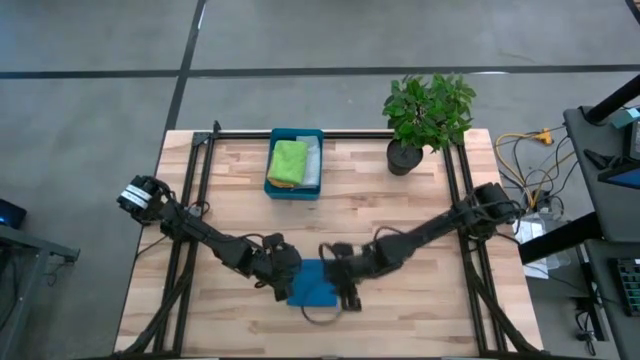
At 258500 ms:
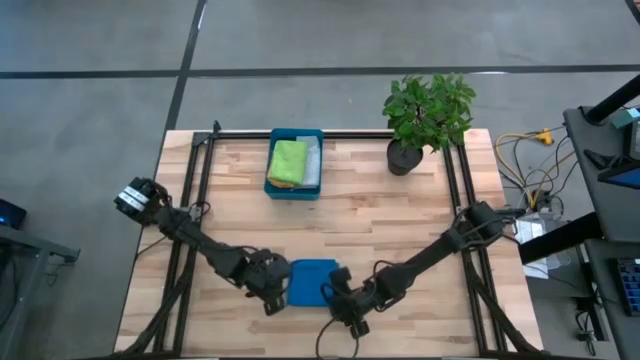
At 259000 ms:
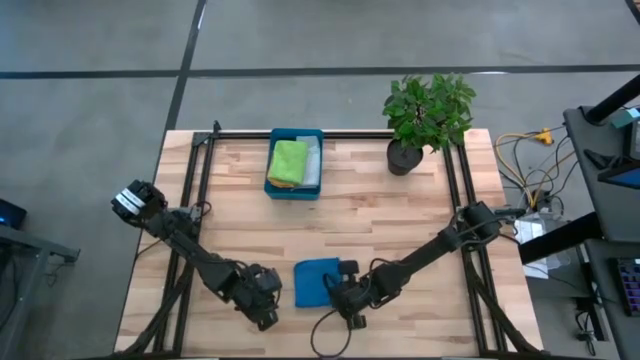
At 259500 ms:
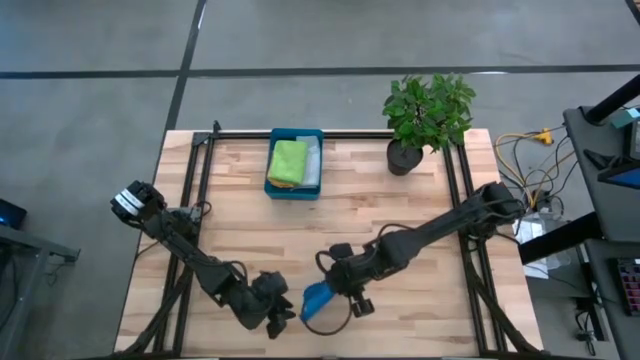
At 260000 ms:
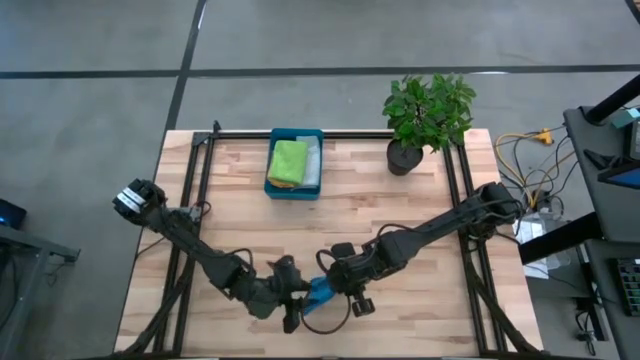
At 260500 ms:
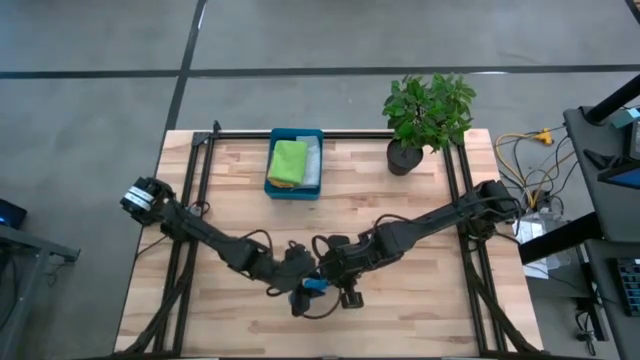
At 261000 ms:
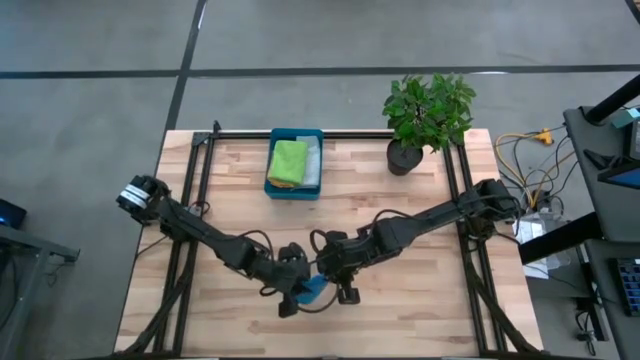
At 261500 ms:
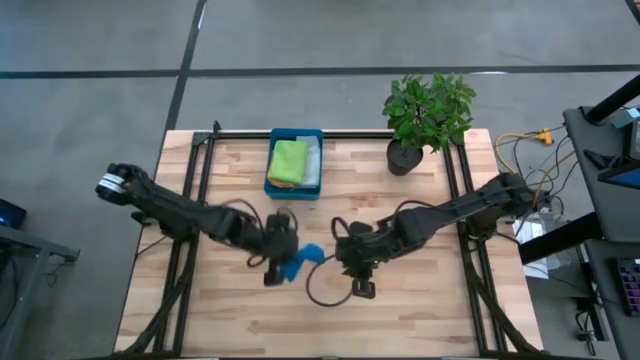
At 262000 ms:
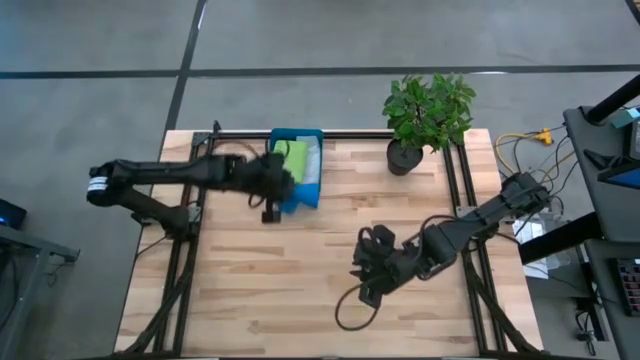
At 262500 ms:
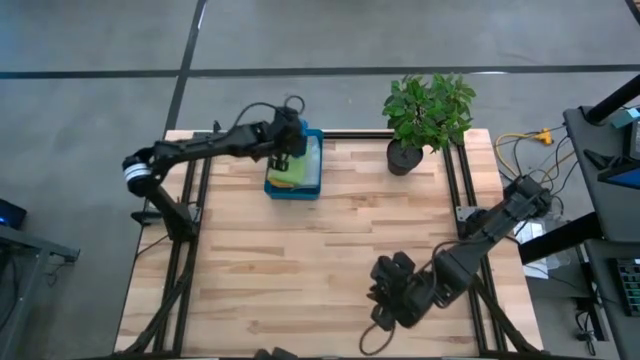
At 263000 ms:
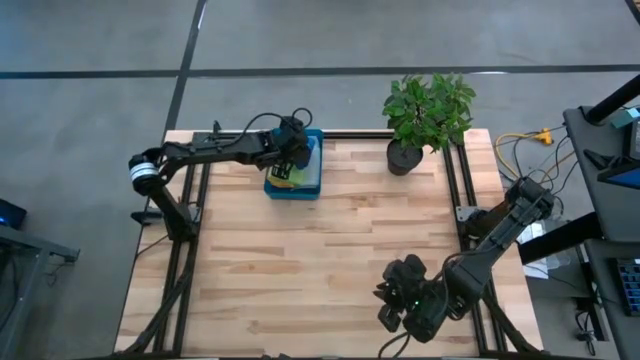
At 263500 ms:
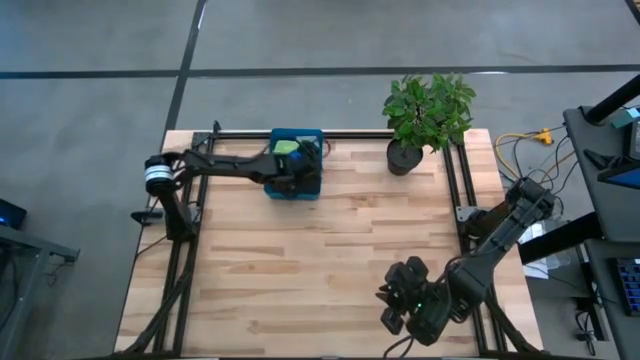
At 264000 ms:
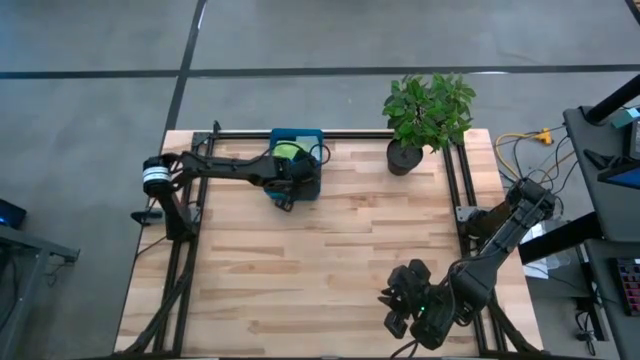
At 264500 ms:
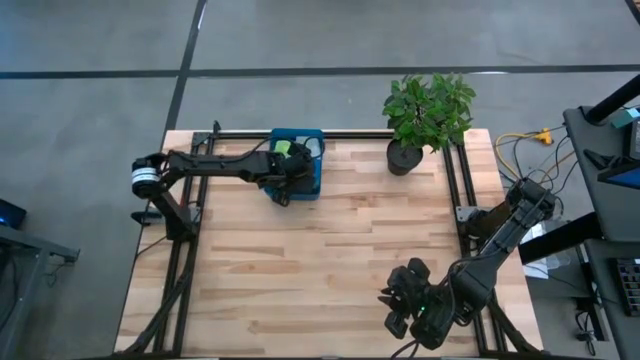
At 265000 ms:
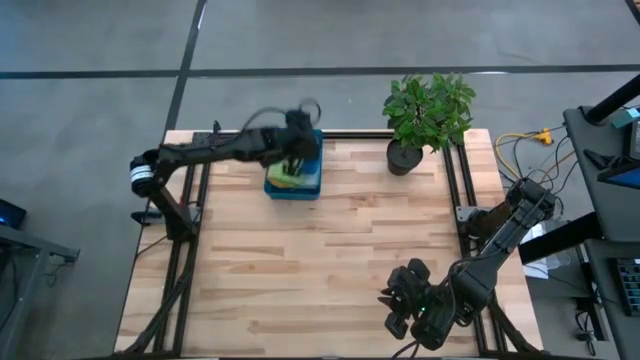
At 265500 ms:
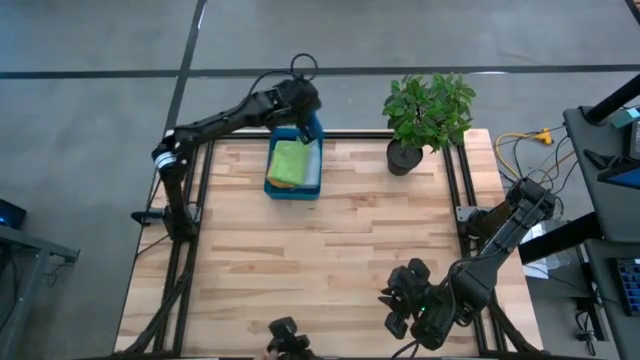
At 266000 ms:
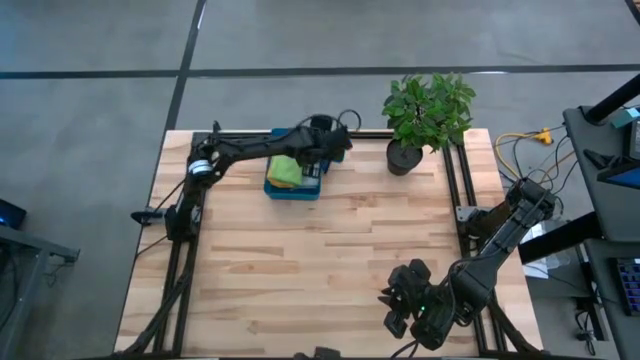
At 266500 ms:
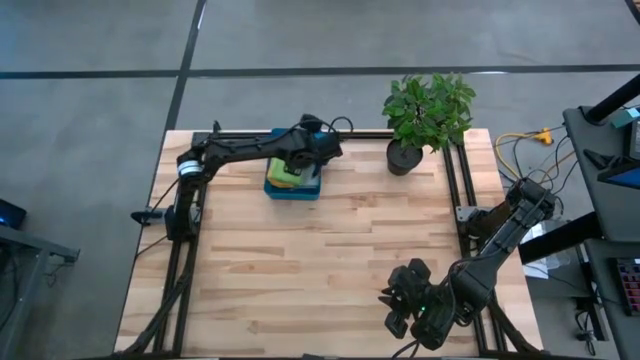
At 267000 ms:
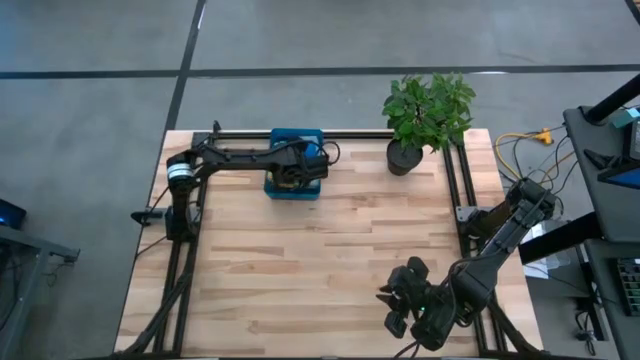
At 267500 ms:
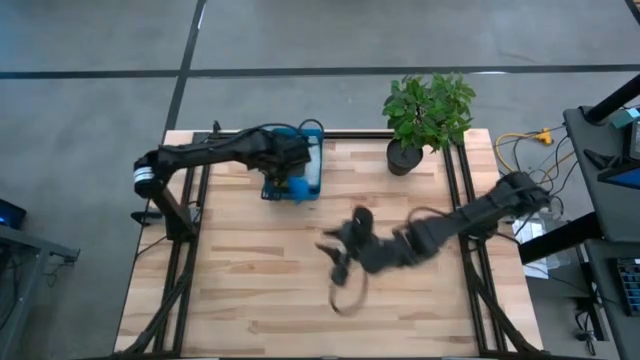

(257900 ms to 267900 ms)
Task: Fold microfiber towels
Put the blue microfiber cloth into the blue bin

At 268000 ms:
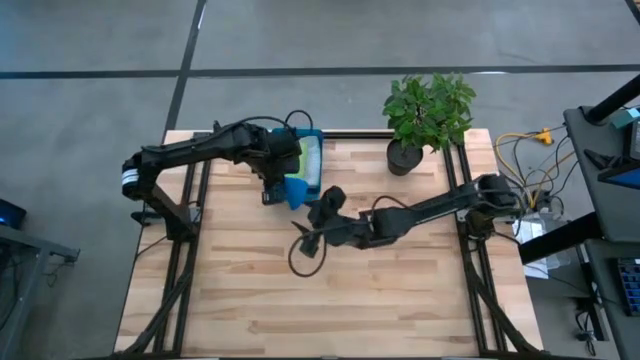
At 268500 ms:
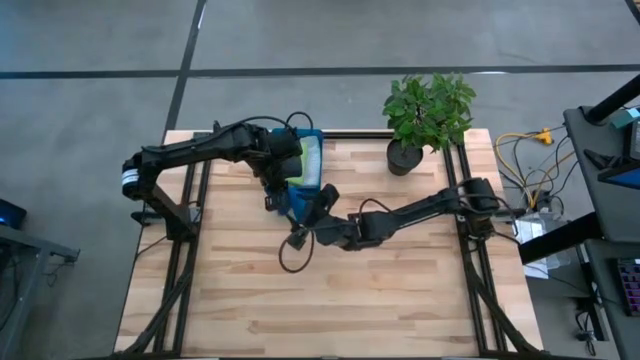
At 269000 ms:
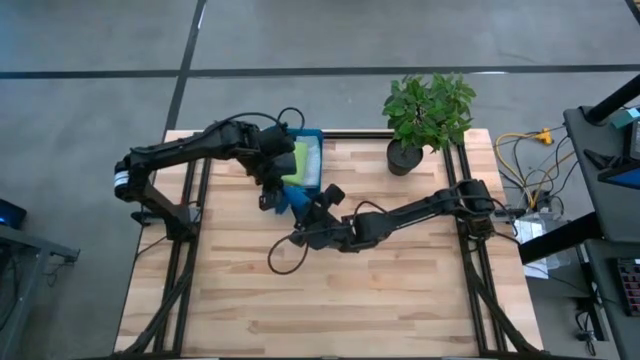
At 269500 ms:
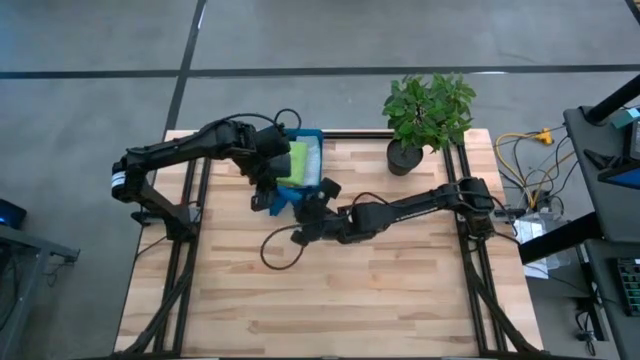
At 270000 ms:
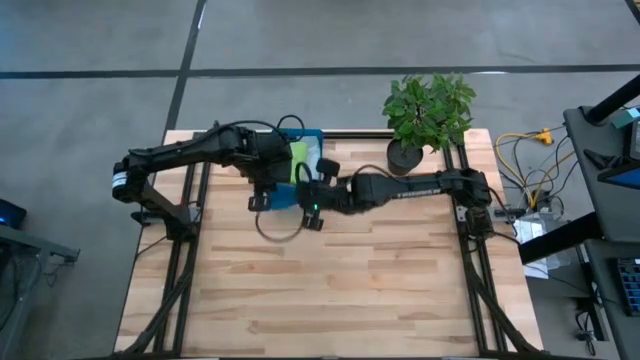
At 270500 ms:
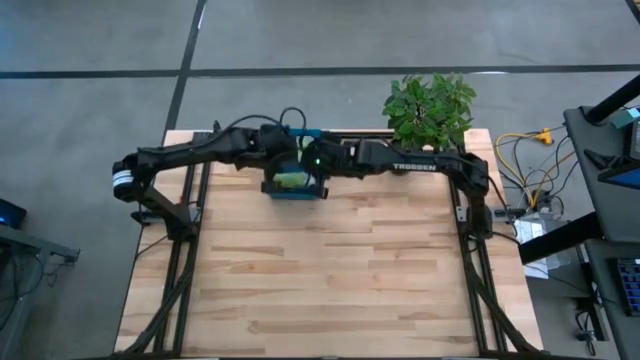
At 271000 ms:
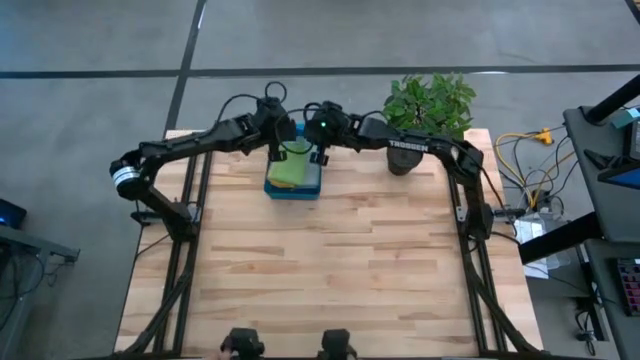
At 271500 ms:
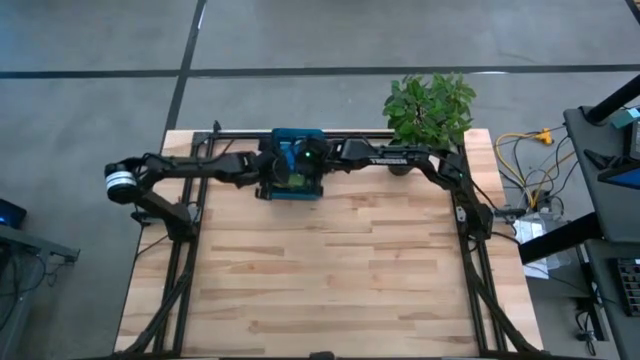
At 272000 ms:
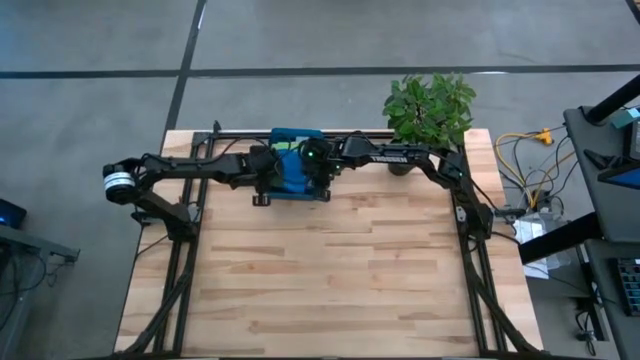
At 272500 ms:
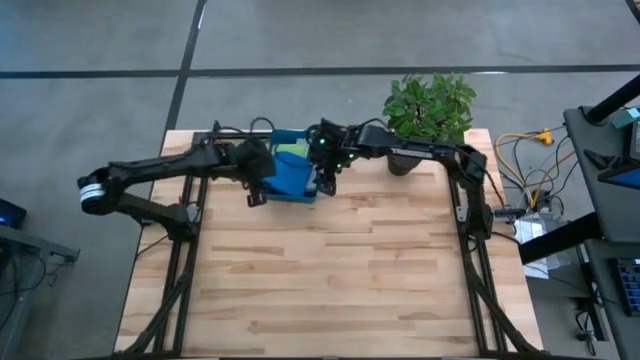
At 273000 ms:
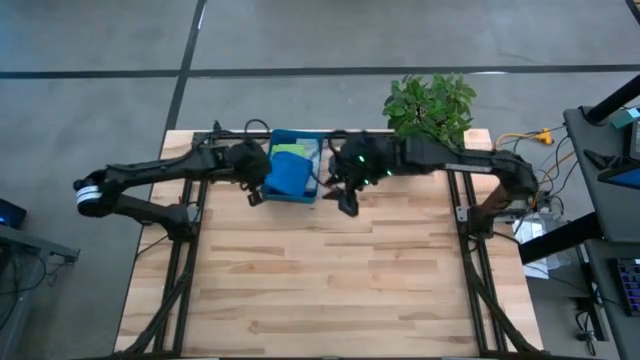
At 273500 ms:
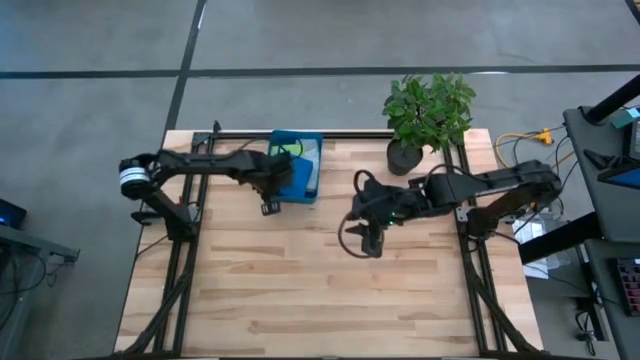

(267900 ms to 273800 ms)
Put the blue microfiber cloth into the blue bin

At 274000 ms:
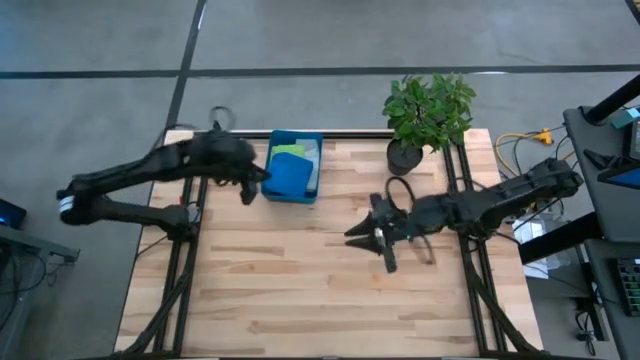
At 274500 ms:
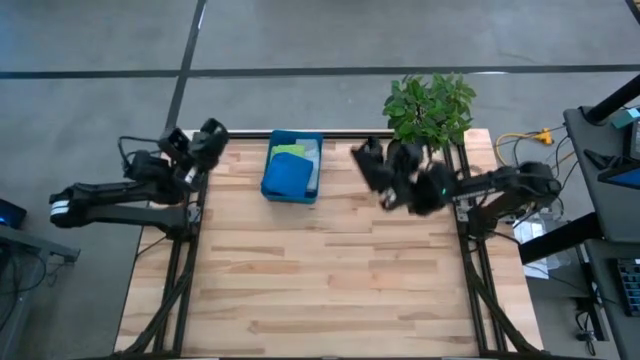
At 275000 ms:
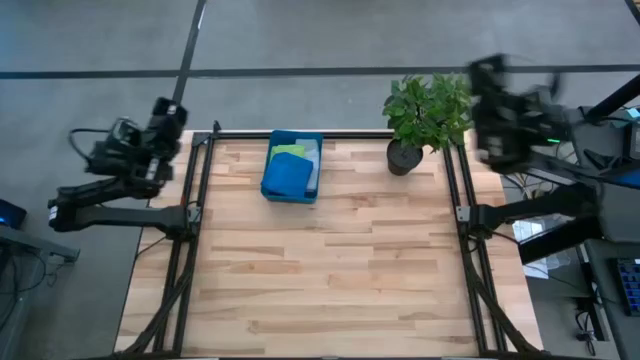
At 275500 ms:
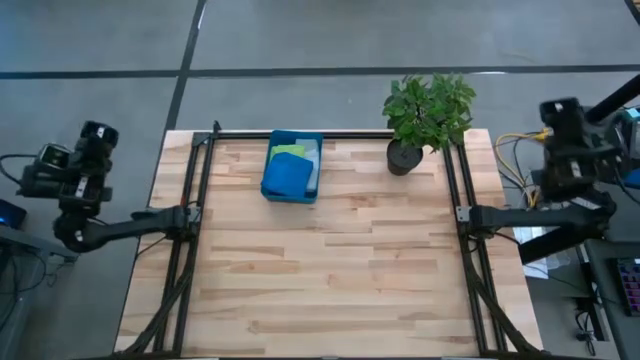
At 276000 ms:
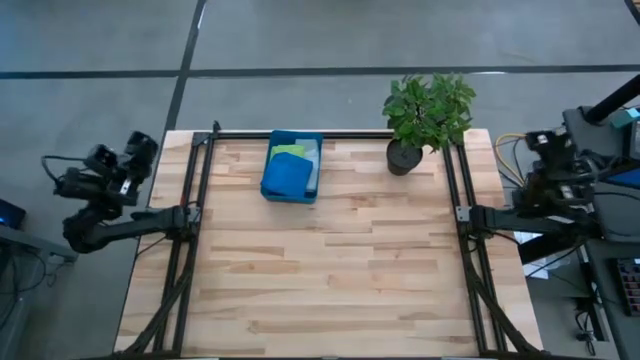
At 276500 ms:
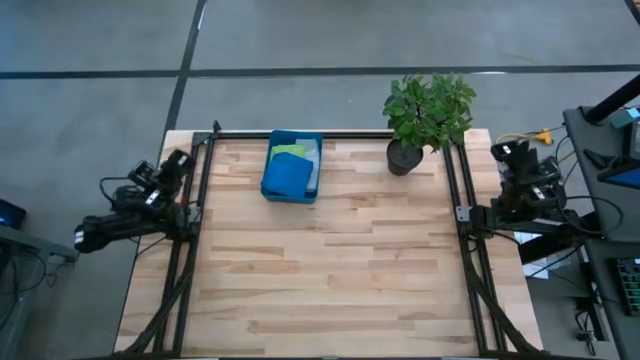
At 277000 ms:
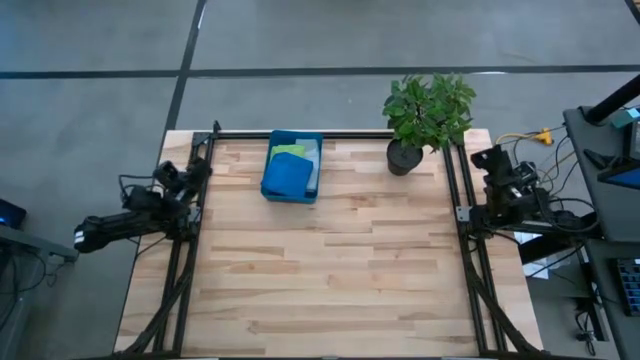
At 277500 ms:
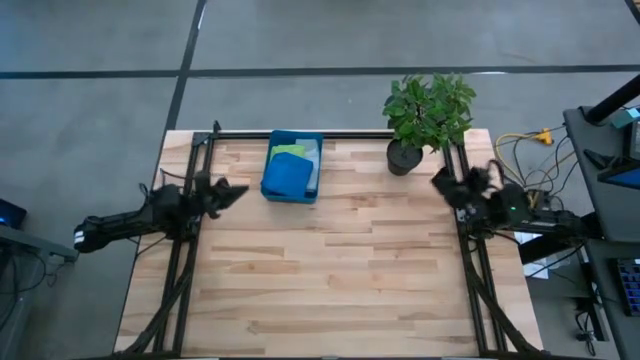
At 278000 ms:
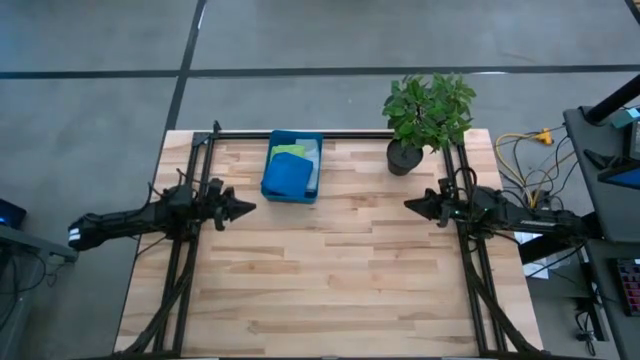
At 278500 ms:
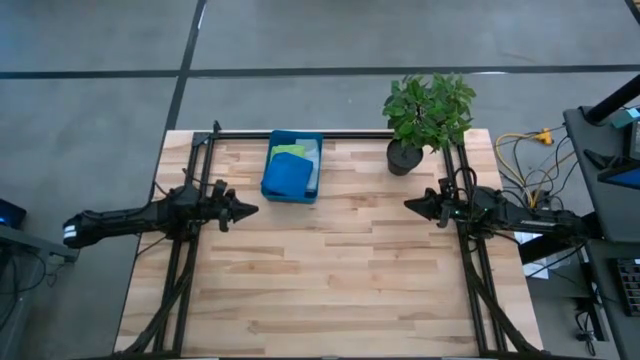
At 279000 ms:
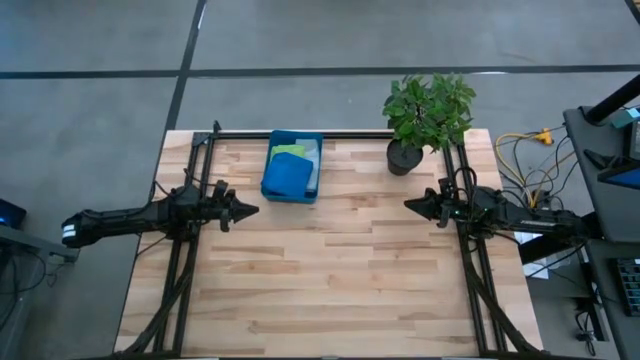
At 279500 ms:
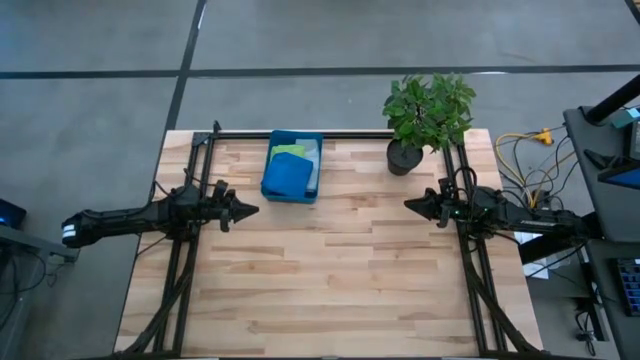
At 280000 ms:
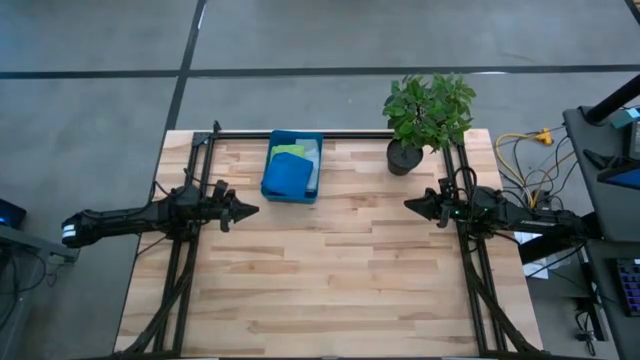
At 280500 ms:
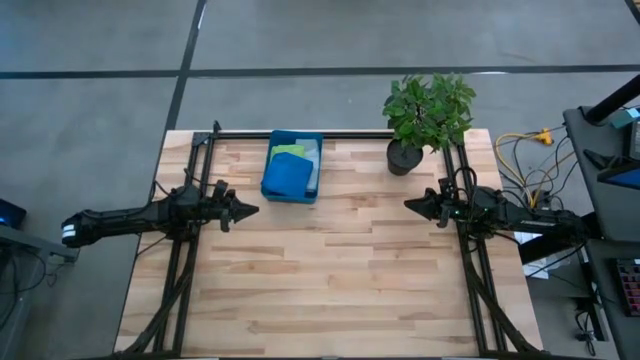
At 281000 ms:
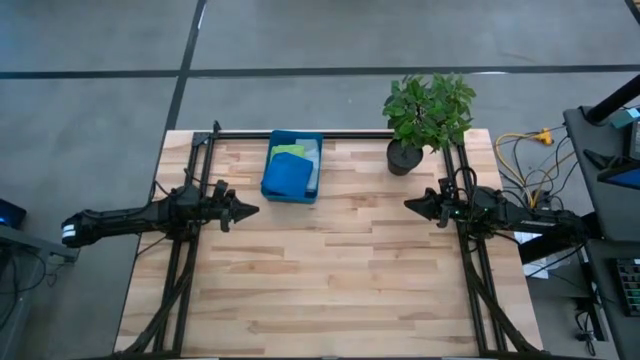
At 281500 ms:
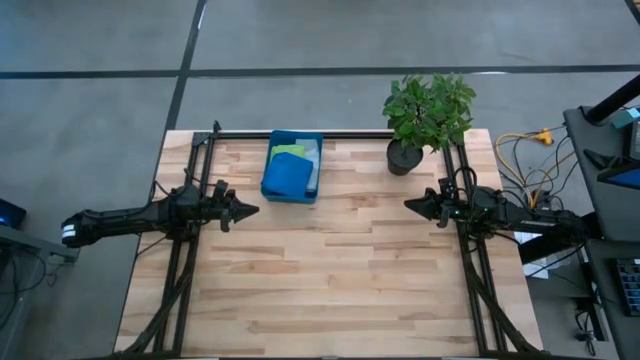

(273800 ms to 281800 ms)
Return to Home Position
